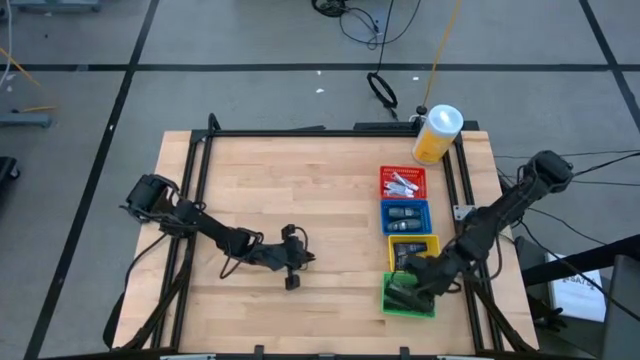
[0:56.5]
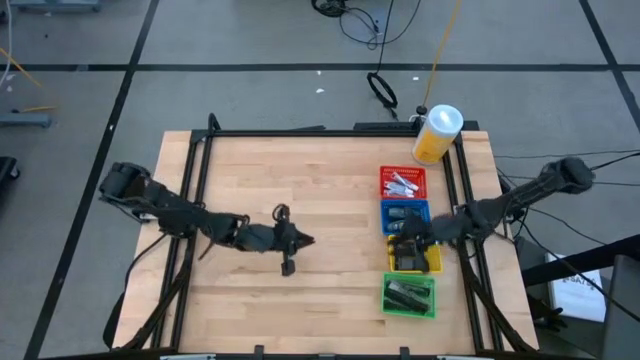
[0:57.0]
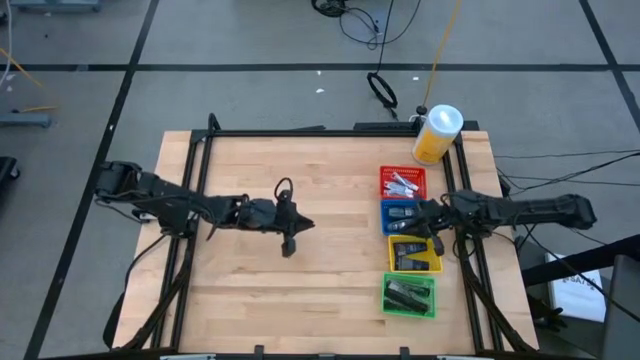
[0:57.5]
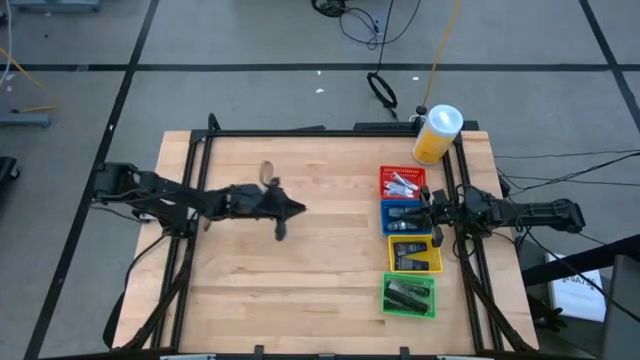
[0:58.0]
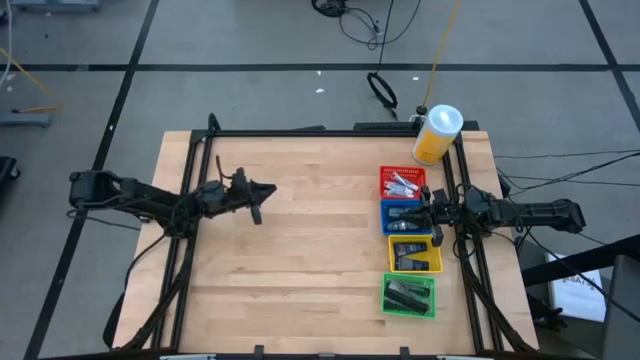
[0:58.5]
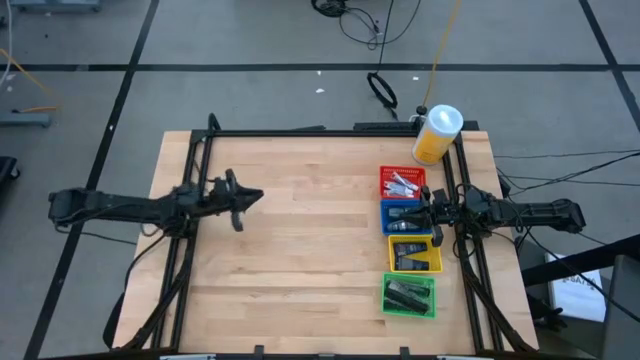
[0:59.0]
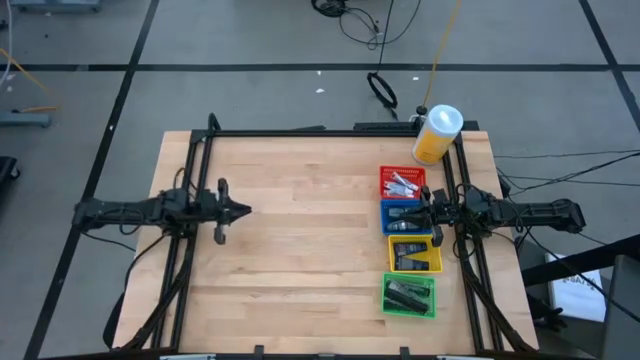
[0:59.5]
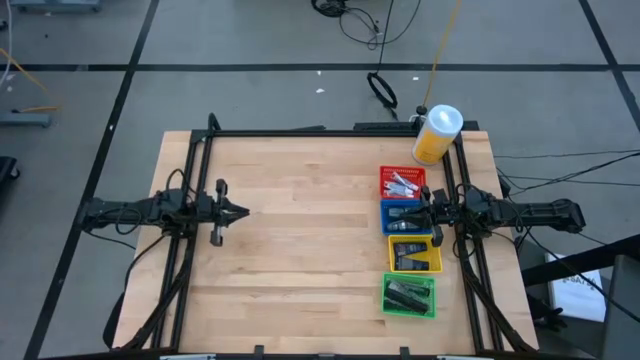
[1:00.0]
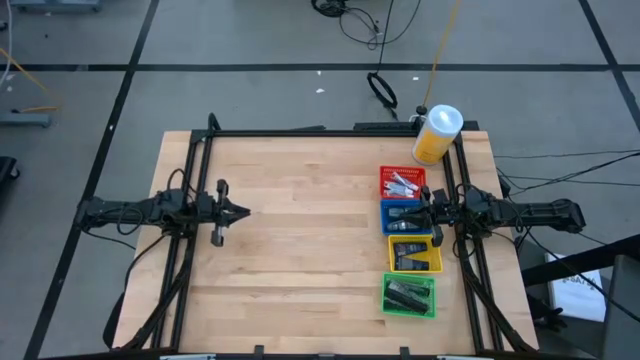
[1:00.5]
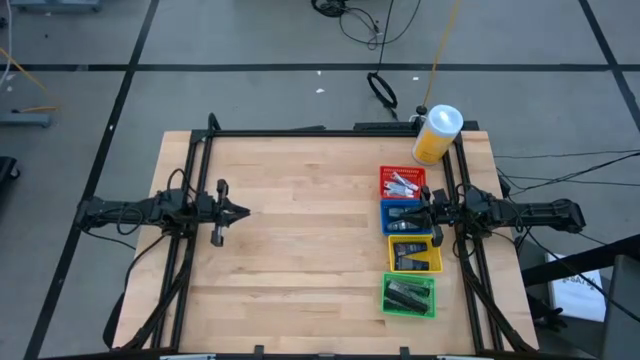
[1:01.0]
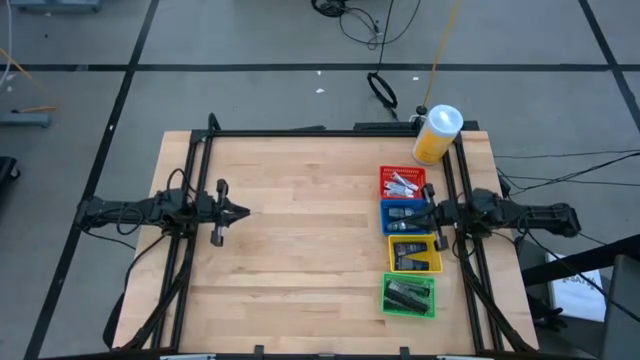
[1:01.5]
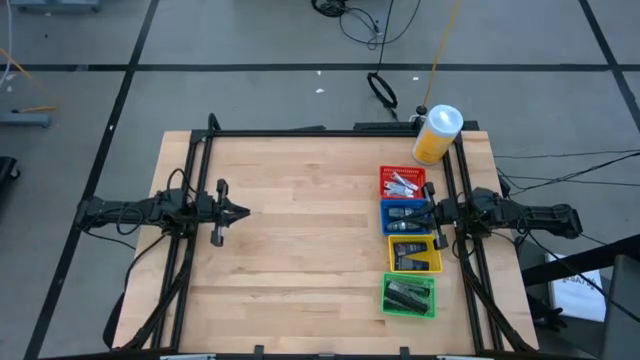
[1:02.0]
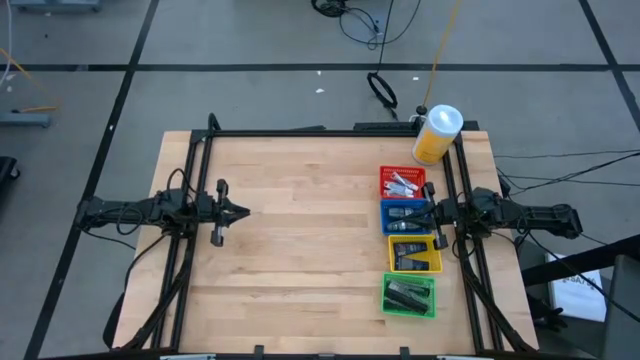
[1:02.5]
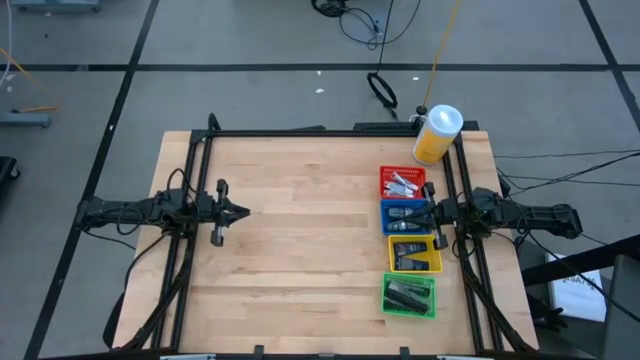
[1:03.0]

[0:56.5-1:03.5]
Task: Pick & Place Travel size toiletries
Return to Home Position

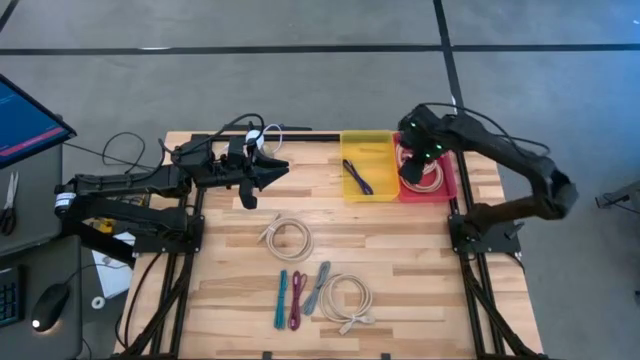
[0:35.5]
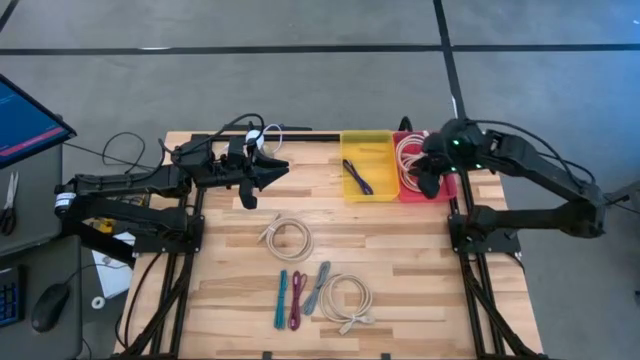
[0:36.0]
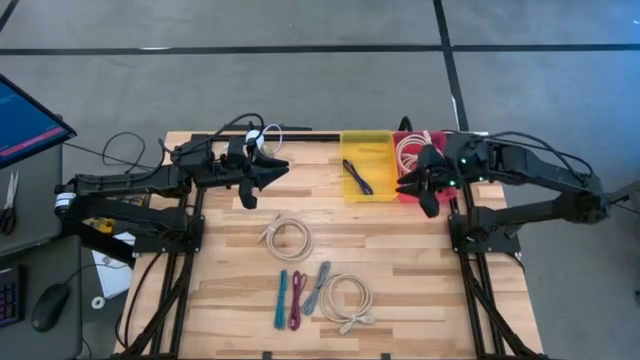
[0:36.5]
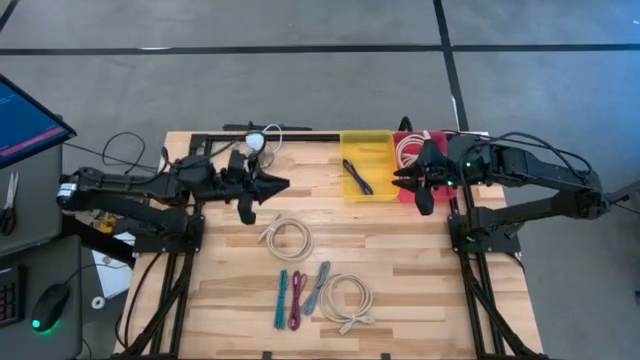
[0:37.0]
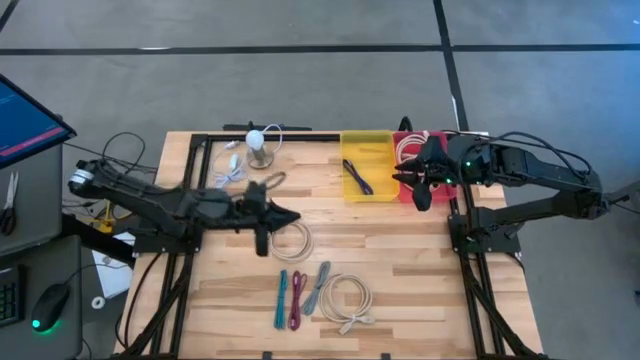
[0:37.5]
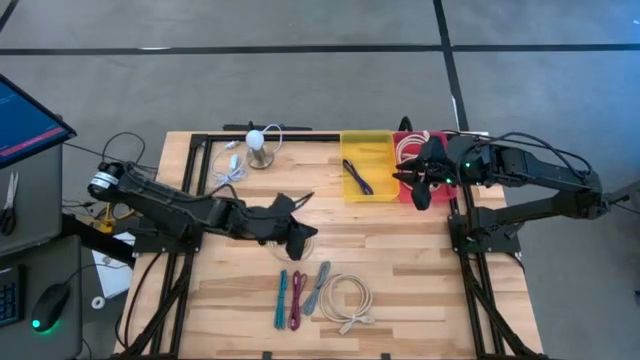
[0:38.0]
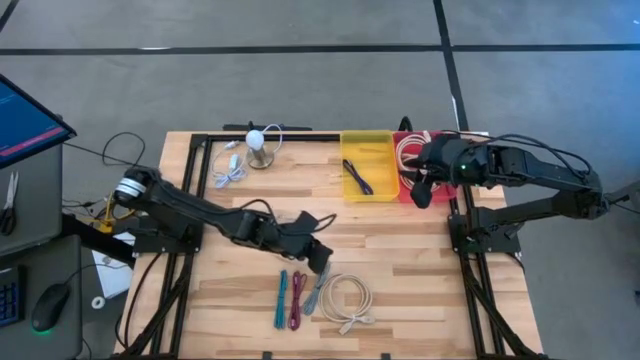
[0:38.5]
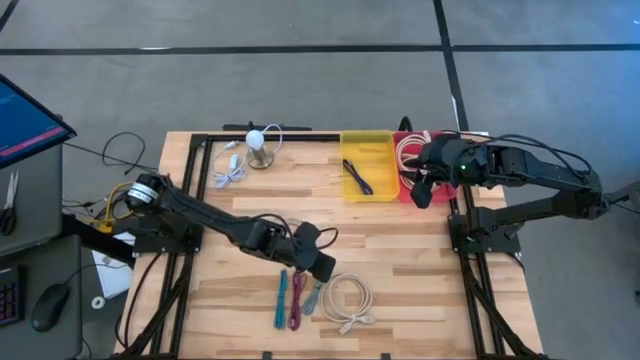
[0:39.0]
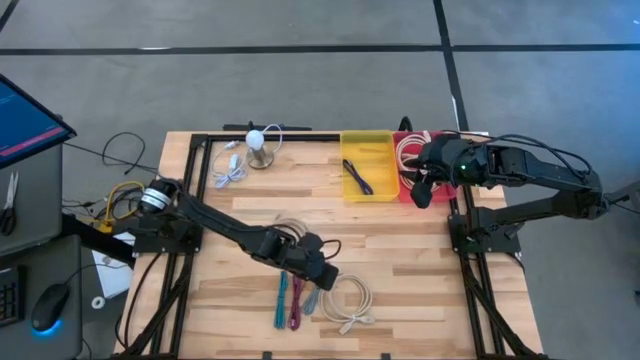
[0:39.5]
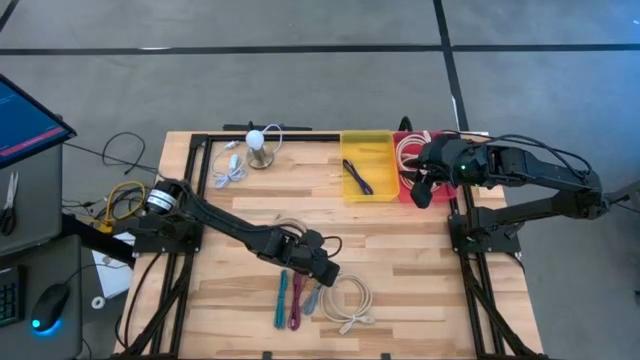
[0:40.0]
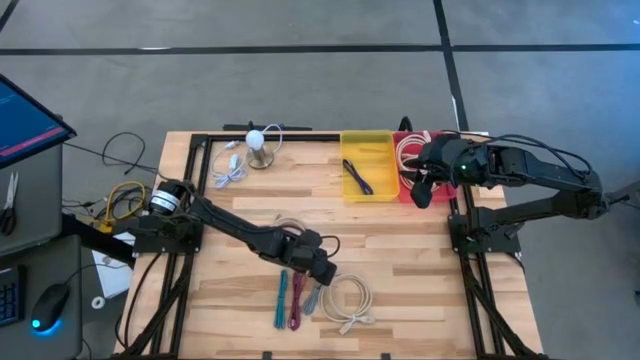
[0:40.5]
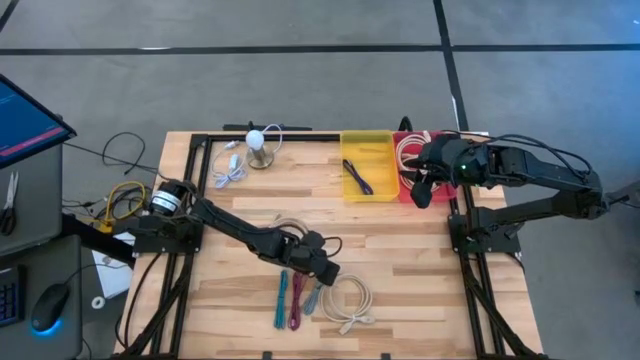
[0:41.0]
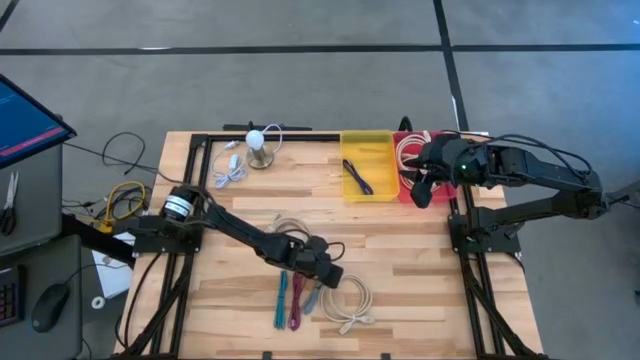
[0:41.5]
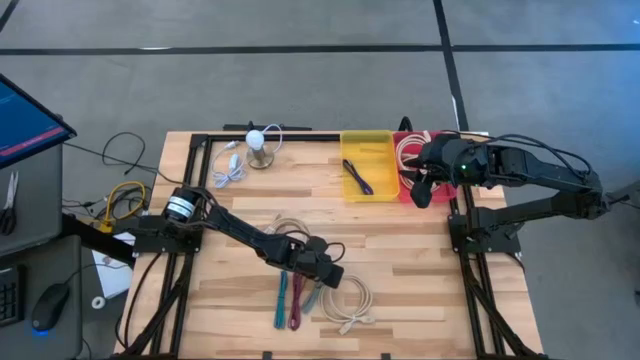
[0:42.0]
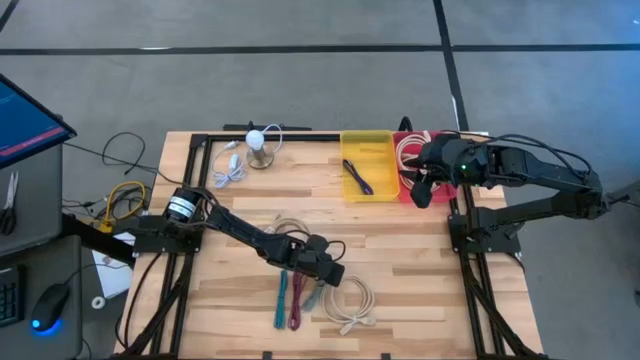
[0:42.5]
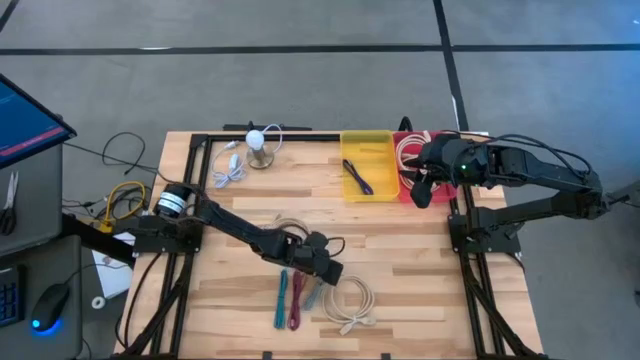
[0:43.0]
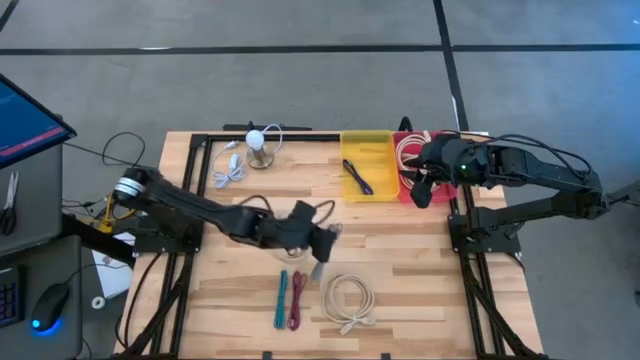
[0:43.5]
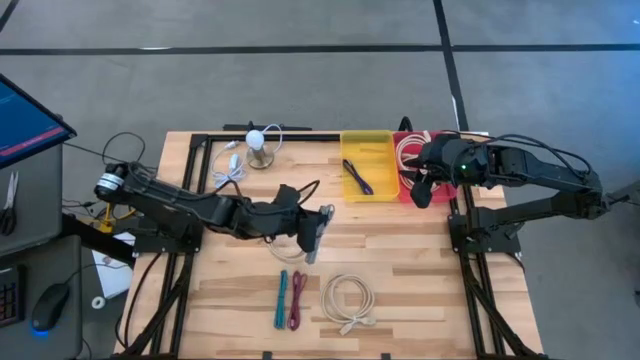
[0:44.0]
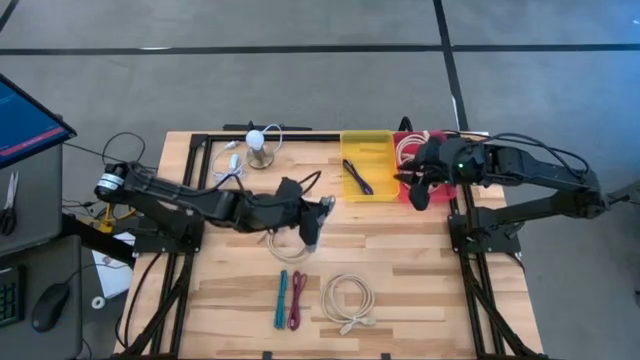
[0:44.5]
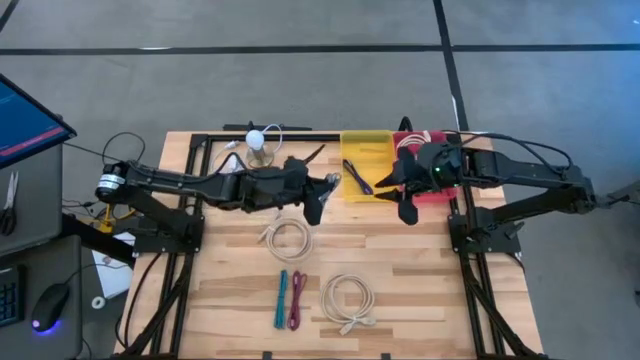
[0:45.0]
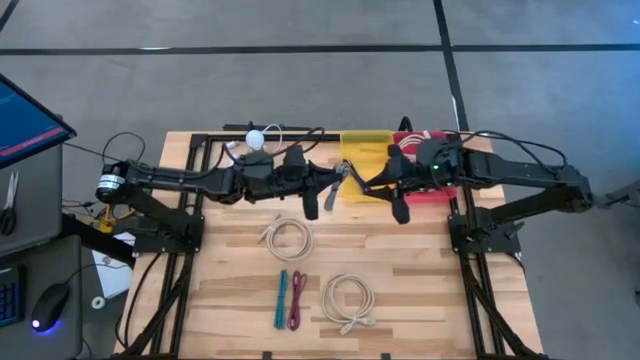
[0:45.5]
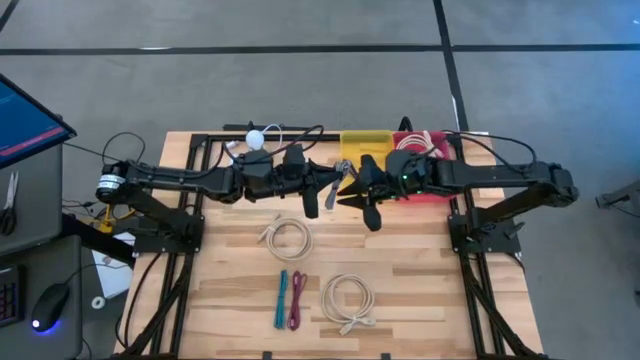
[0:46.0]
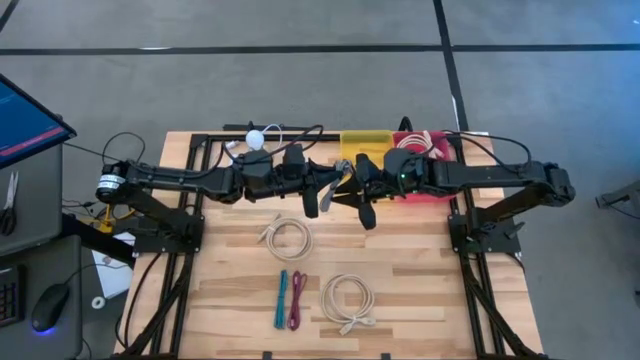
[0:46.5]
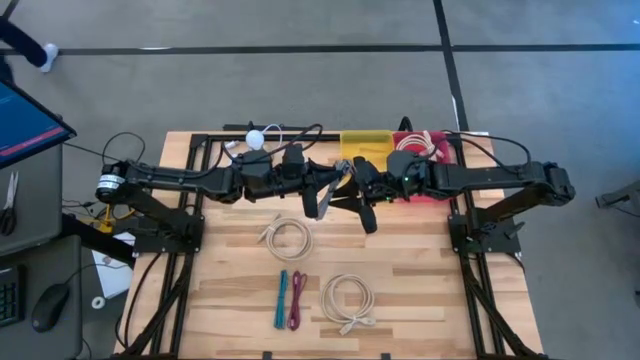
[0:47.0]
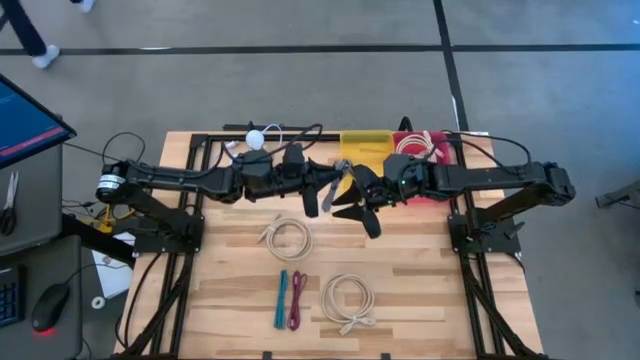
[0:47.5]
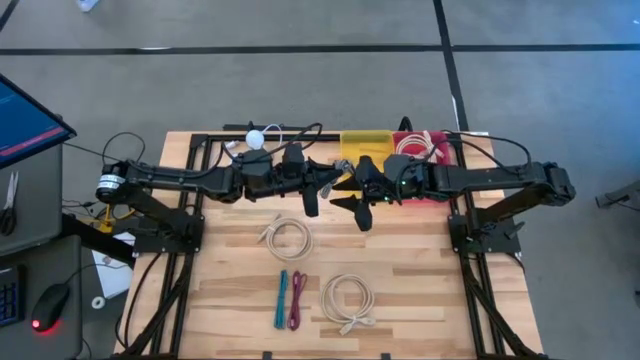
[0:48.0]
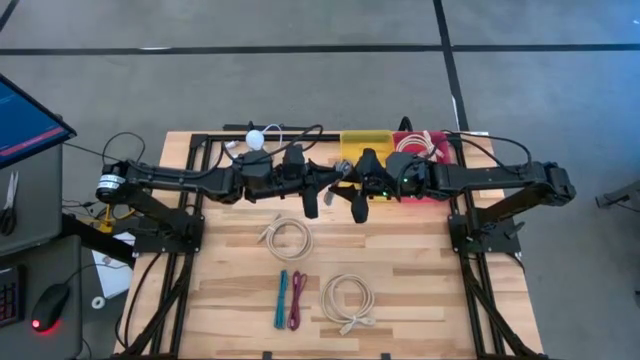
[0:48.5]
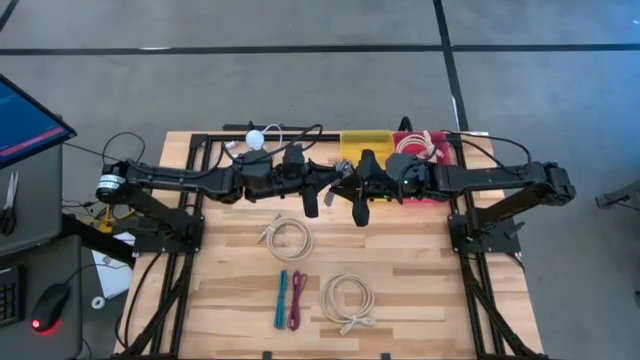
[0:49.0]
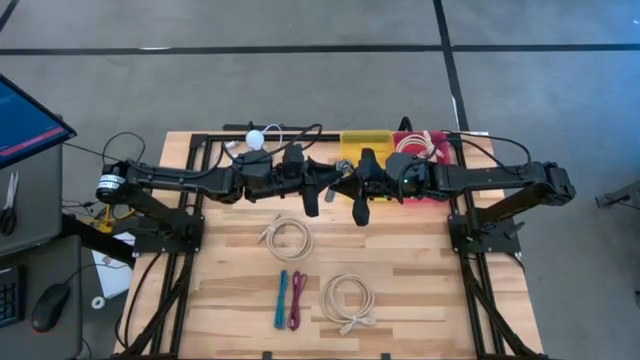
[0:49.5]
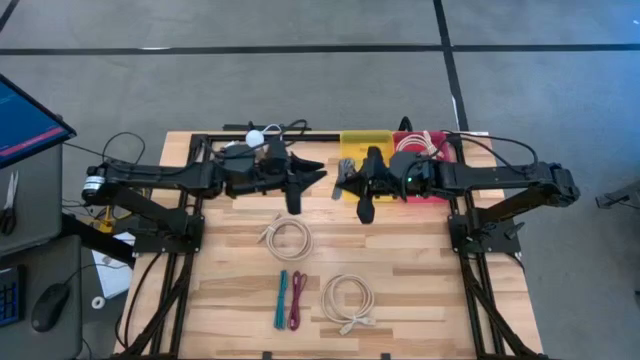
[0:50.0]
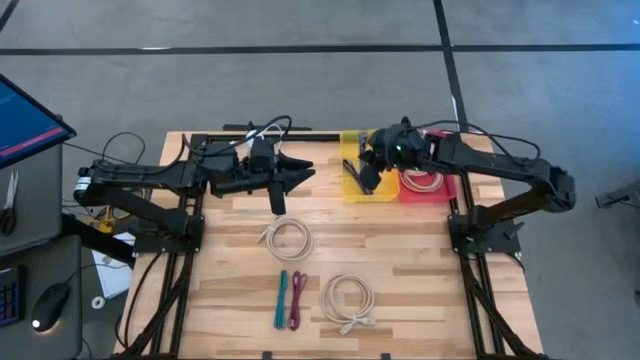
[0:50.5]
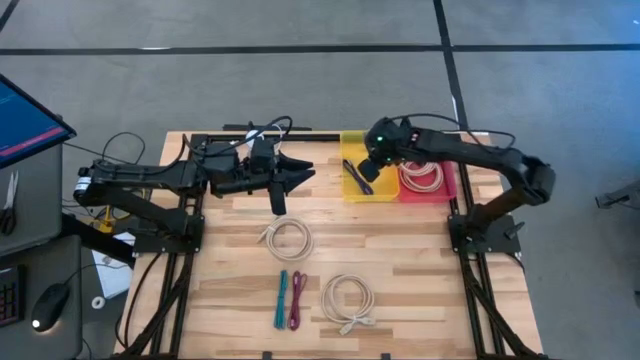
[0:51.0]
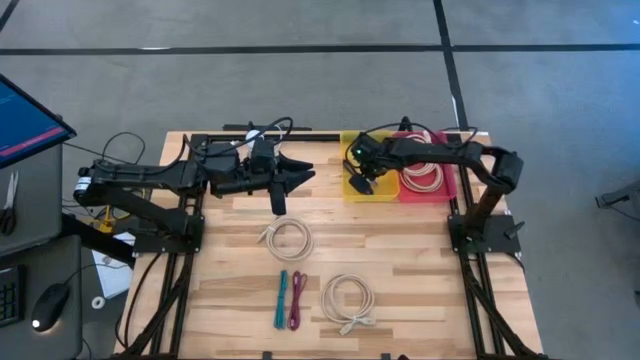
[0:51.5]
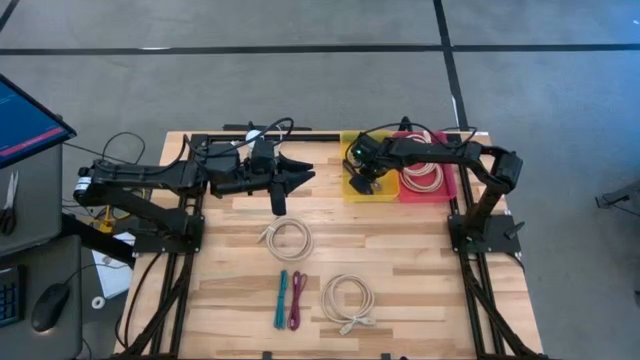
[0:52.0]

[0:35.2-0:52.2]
Task: Pick & Place USB Port
Put the white charger cable into the yellow bin
